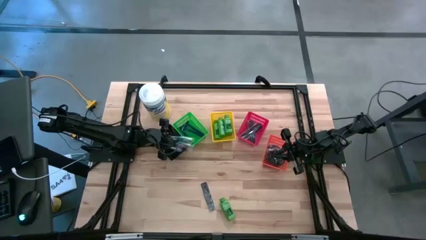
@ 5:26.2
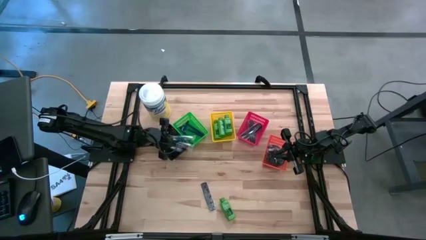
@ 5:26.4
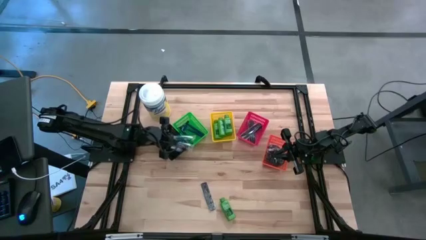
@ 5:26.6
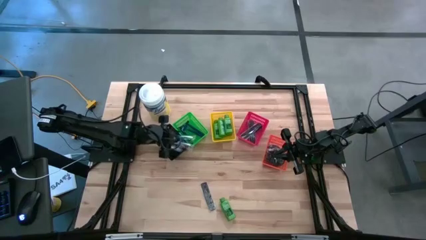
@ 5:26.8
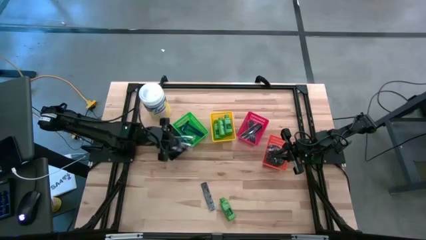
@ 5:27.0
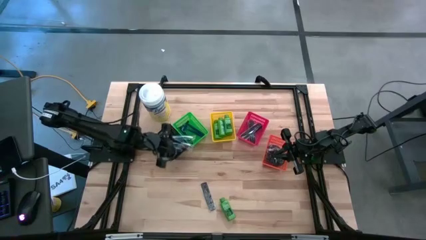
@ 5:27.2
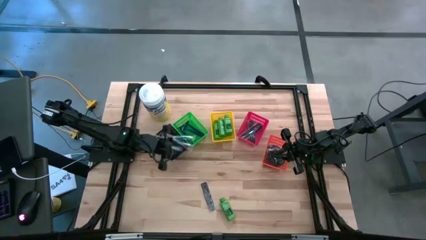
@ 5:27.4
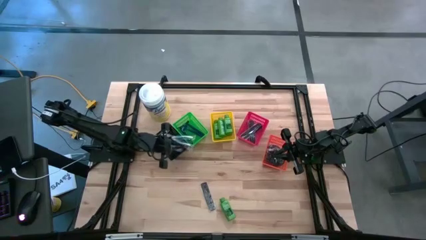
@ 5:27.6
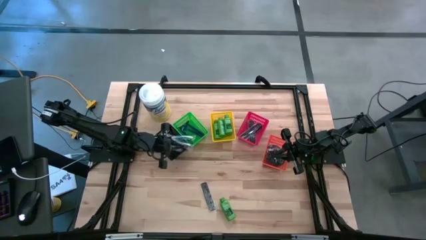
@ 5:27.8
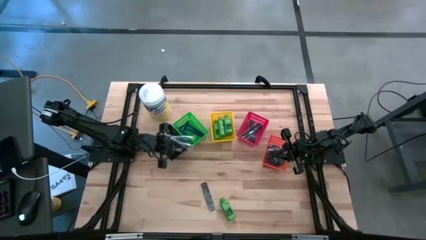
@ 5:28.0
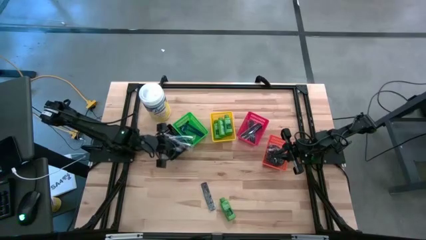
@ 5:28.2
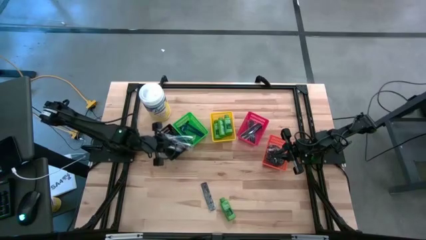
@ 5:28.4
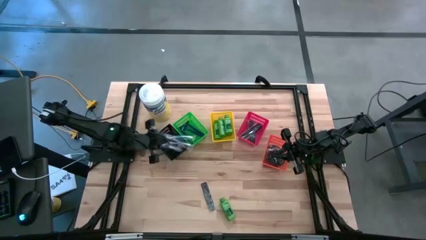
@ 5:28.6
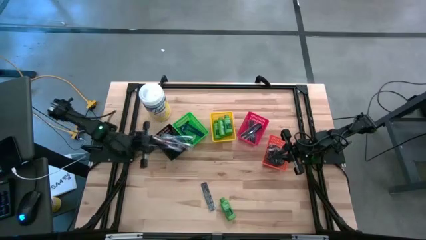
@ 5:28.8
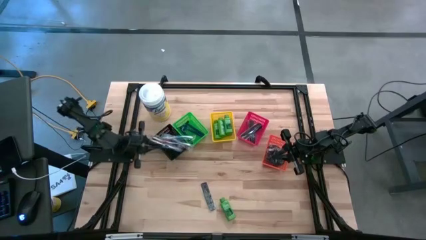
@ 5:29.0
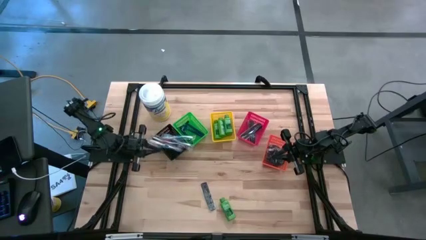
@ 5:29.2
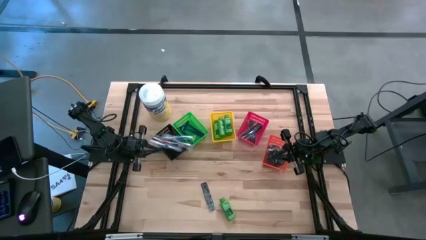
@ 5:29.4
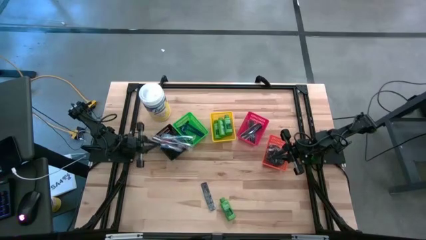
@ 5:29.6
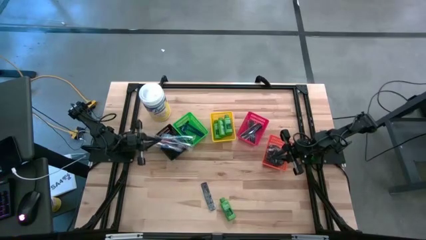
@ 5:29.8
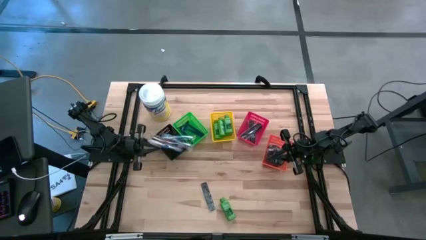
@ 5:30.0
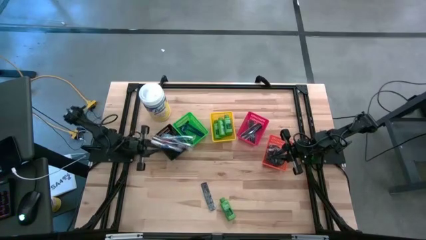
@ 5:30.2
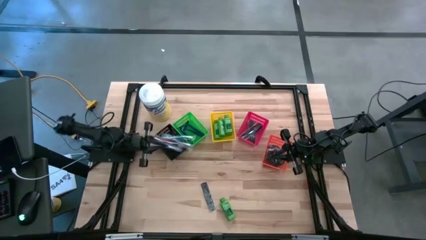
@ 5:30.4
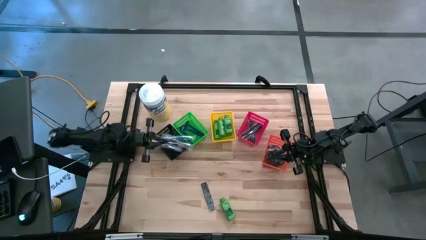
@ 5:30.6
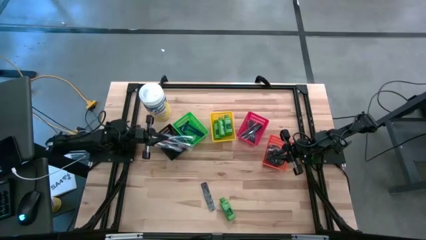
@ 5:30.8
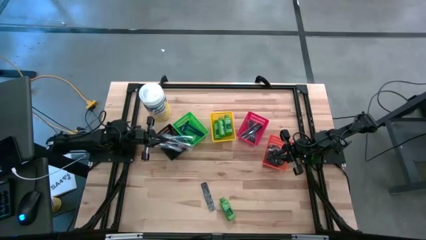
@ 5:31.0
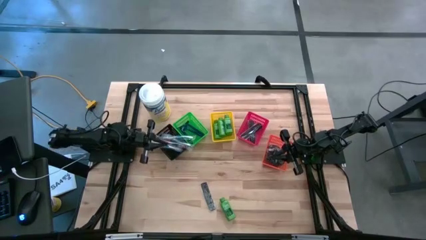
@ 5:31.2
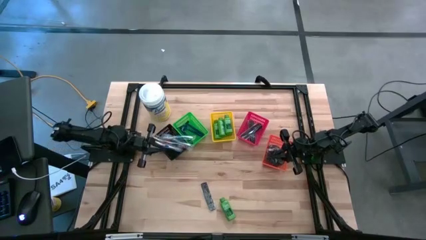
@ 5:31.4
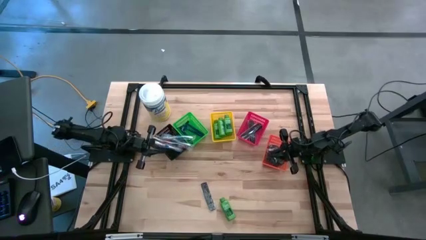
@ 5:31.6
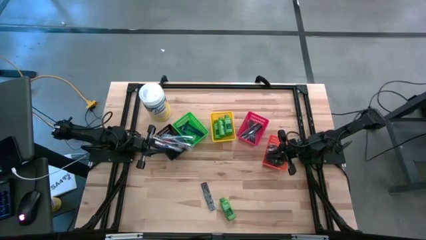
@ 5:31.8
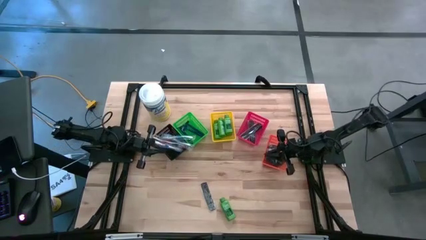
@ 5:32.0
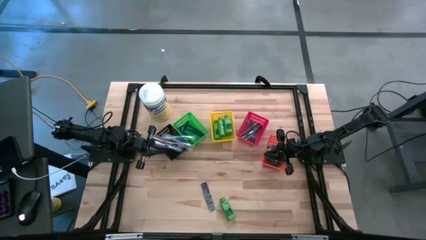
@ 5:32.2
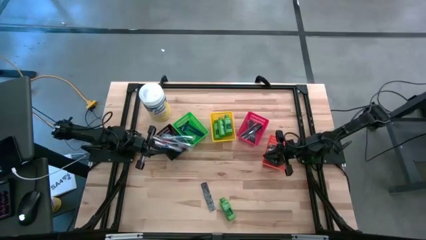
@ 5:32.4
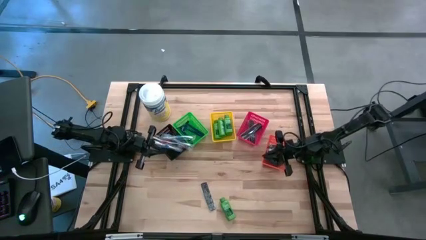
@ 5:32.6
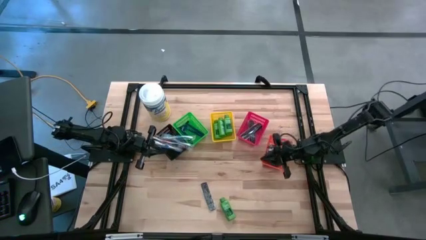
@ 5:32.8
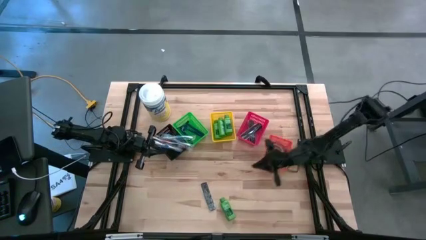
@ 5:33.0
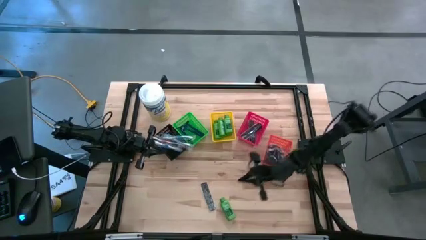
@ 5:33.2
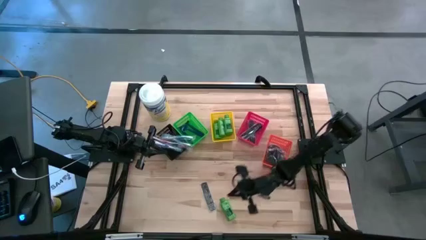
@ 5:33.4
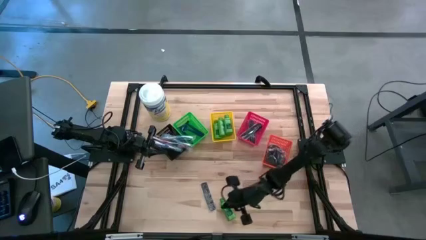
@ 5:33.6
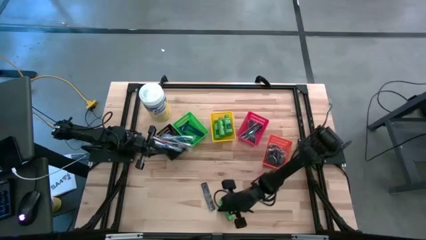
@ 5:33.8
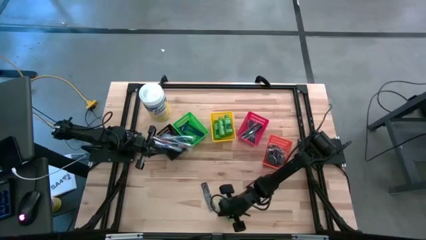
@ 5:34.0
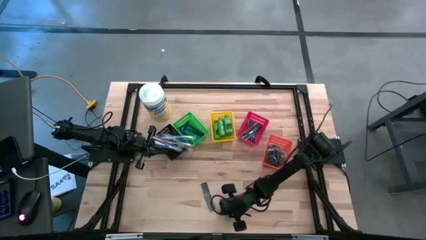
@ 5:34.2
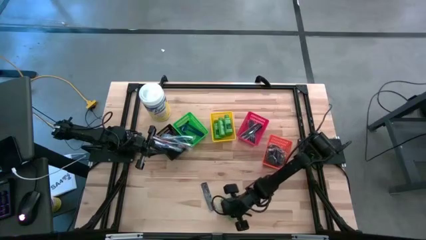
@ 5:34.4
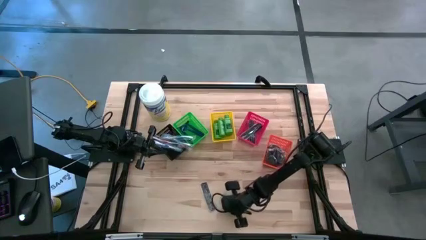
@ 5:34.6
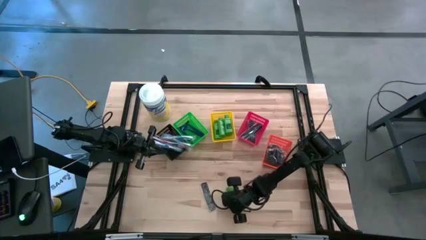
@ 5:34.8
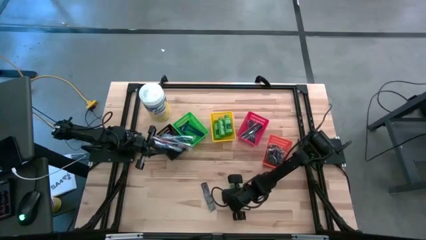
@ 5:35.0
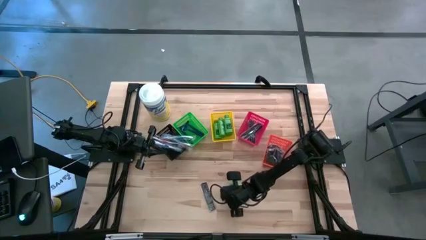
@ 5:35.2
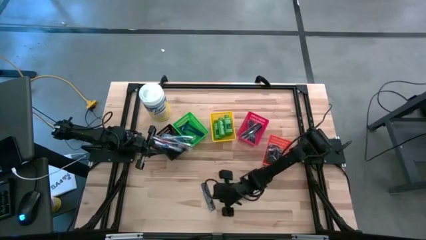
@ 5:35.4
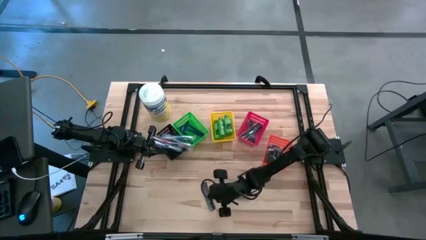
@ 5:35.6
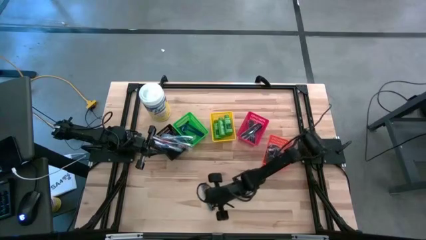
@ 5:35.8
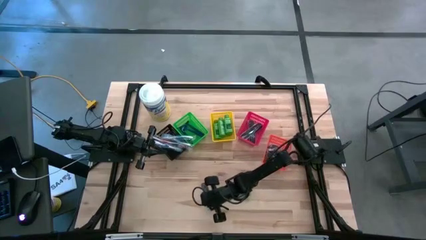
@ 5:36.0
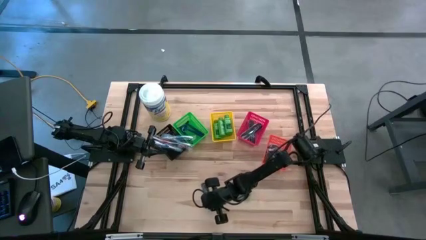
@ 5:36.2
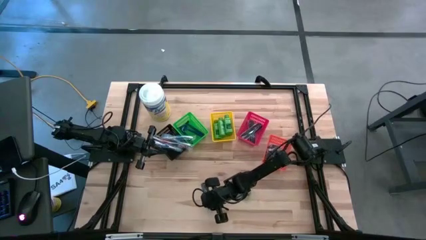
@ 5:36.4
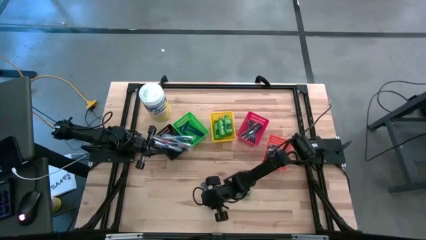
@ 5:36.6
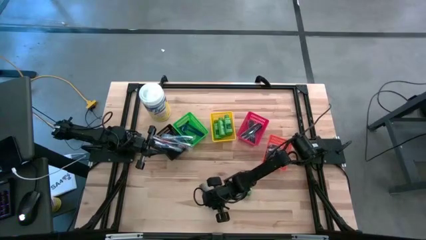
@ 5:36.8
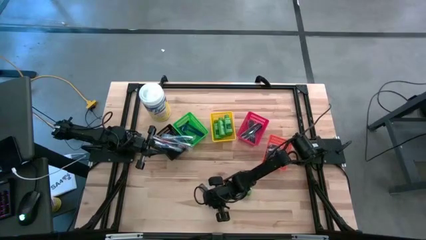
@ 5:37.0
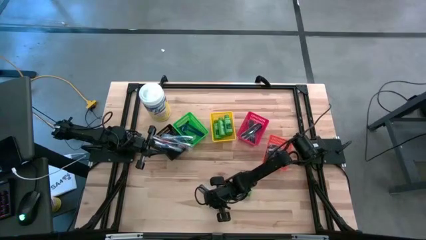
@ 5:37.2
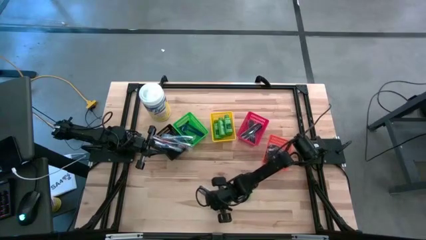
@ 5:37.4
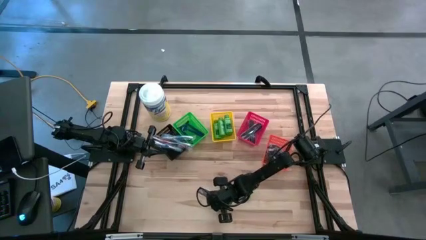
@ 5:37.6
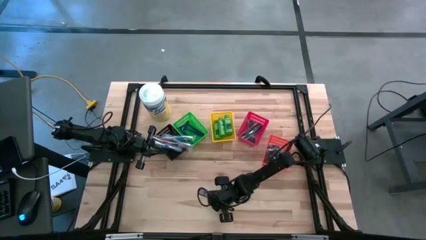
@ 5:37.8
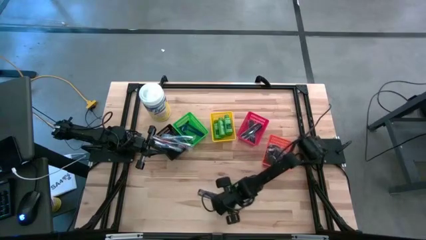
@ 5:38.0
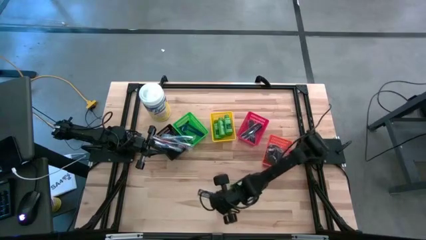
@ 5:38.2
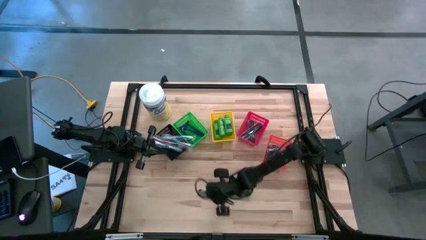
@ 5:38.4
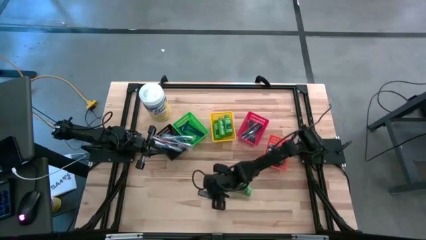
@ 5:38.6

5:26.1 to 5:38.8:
Task: Pick & Place Travel size toiletries
Put the black hair comb into the red bin
